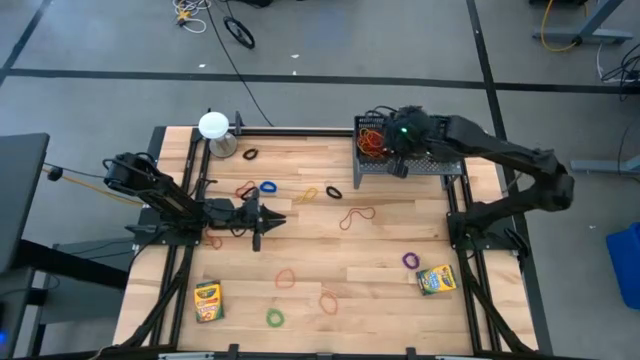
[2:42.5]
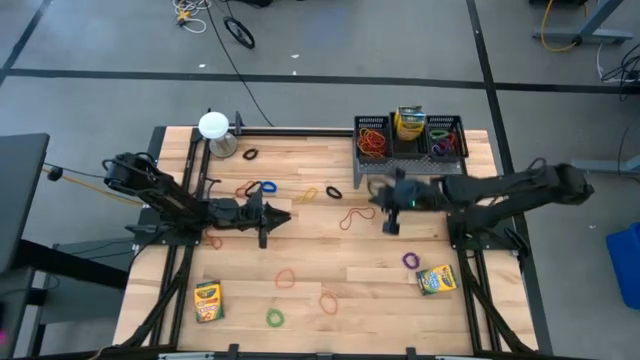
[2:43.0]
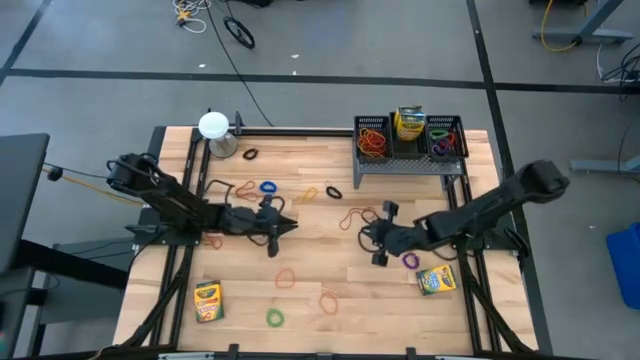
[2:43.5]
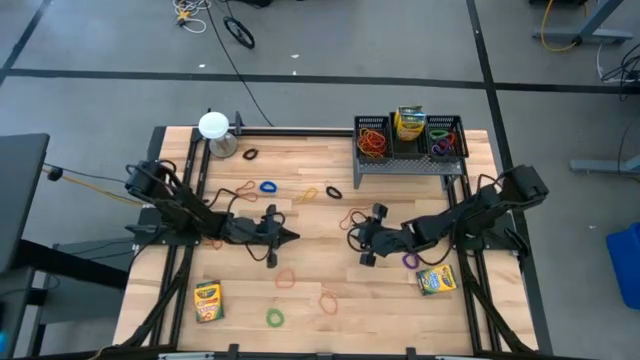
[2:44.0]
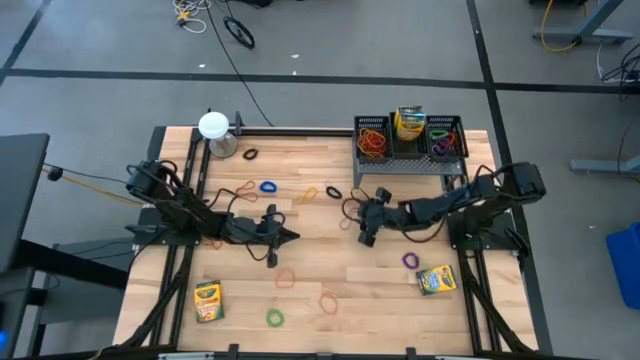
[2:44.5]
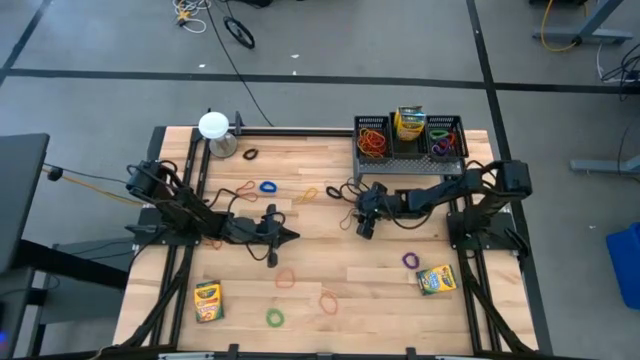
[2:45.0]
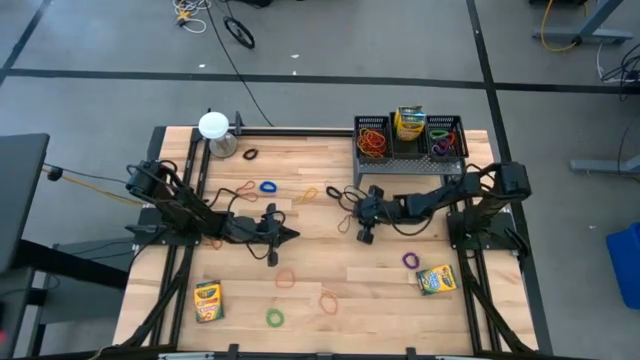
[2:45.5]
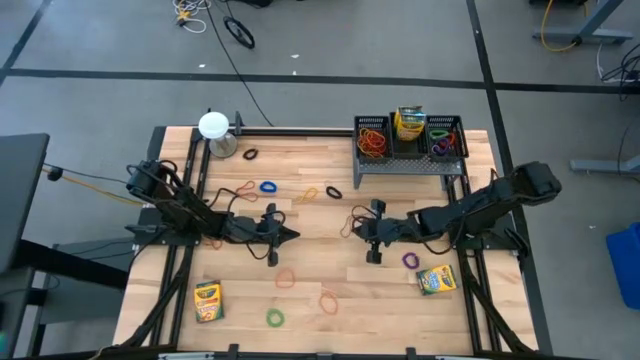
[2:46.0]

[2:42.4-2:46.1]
Task: Pick & Place Office Desk Supplies
Put the red rubber band into the left black bin on the shelf

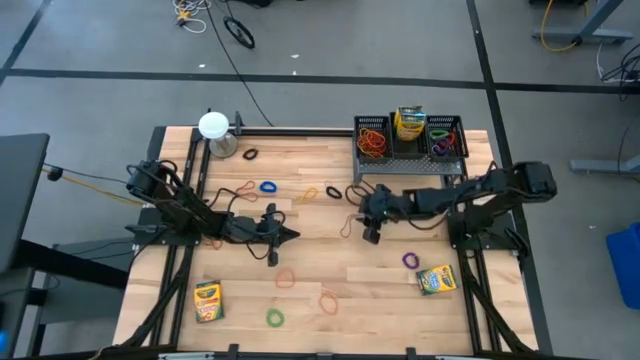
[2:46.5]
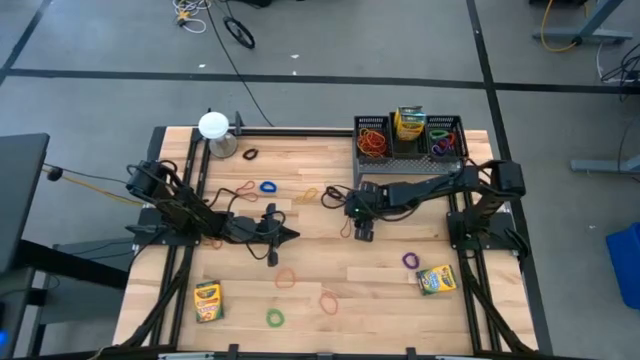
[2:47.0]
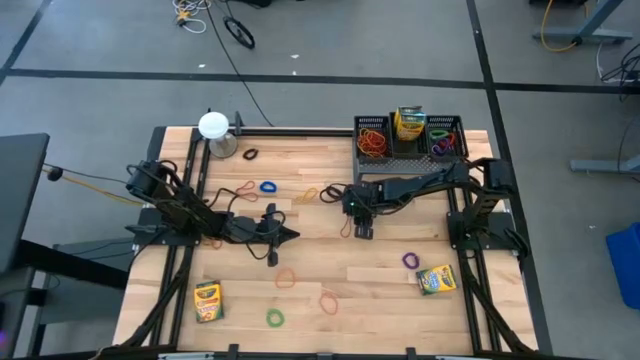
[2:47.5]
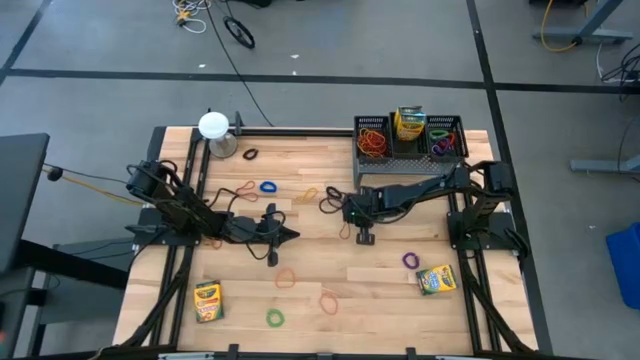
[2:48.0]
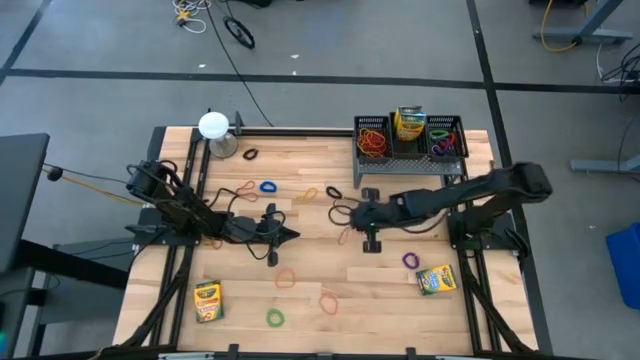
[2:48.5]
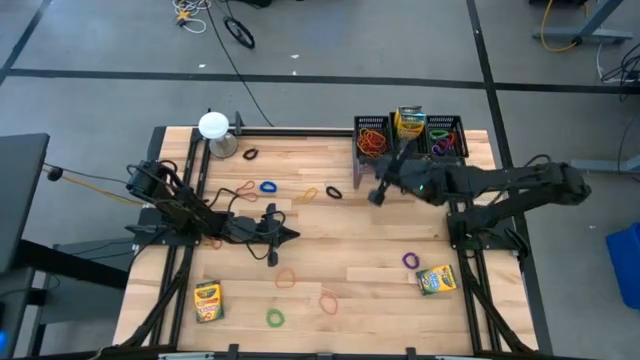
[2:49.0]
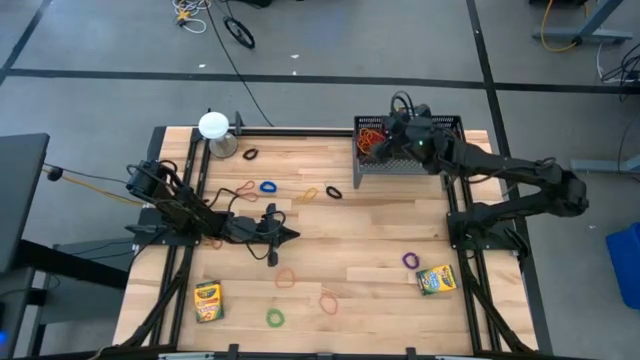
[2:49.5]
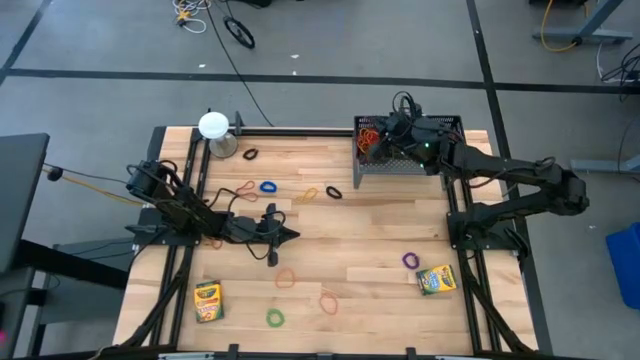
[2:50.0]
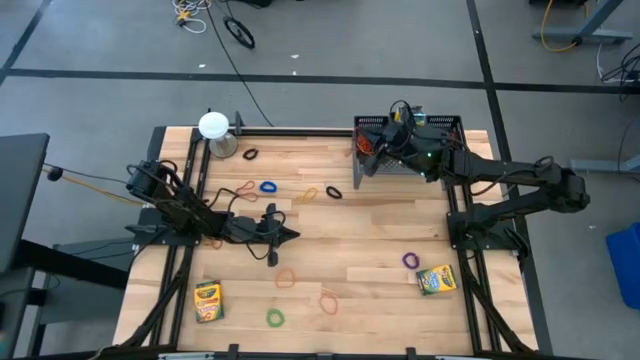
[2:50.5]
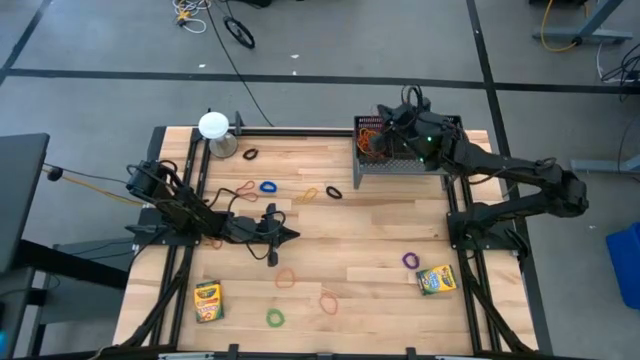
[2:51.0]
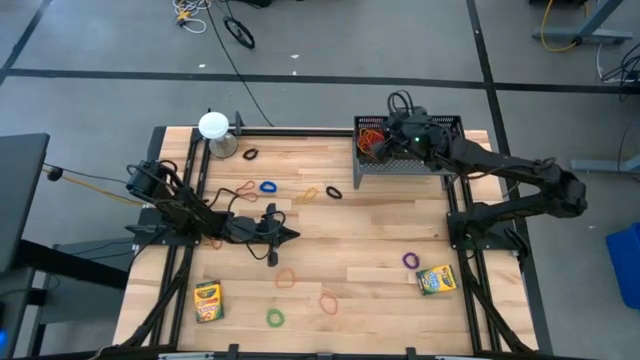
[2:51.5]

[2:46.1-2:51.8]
Put the red rubber band into the left black bin on the shelf

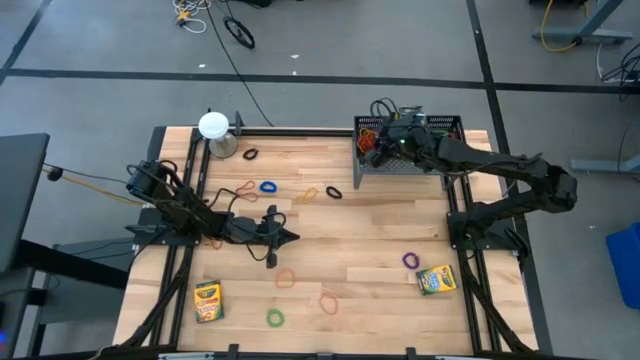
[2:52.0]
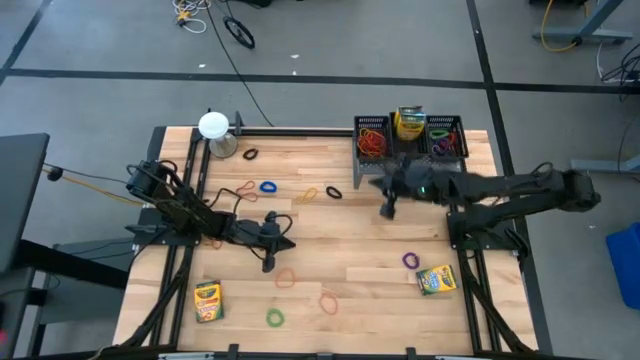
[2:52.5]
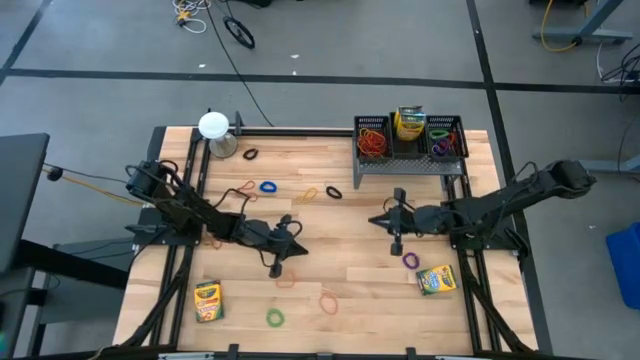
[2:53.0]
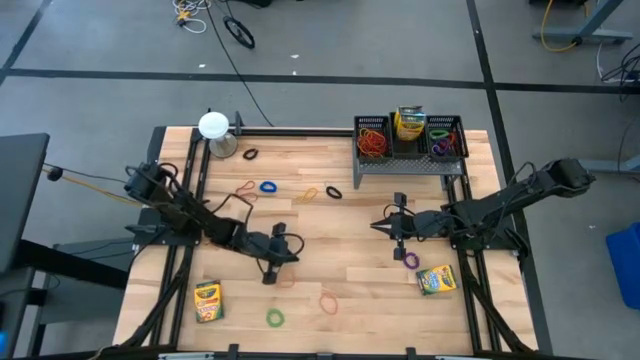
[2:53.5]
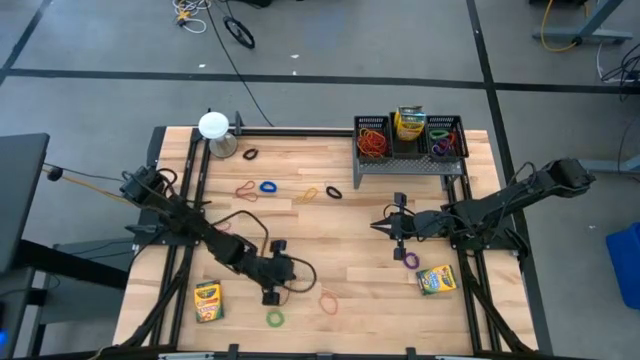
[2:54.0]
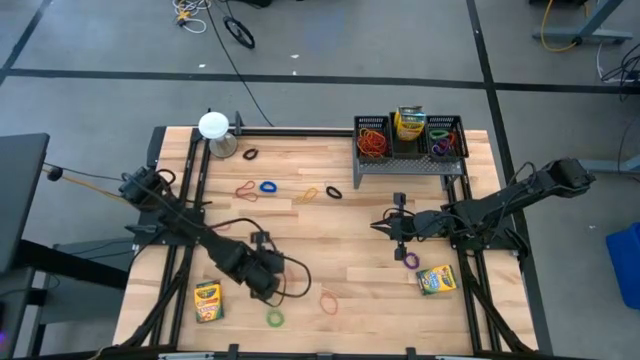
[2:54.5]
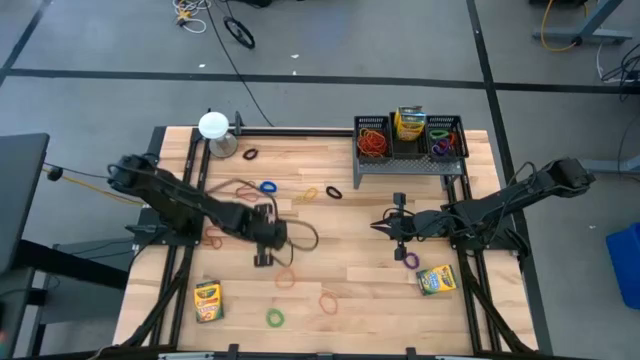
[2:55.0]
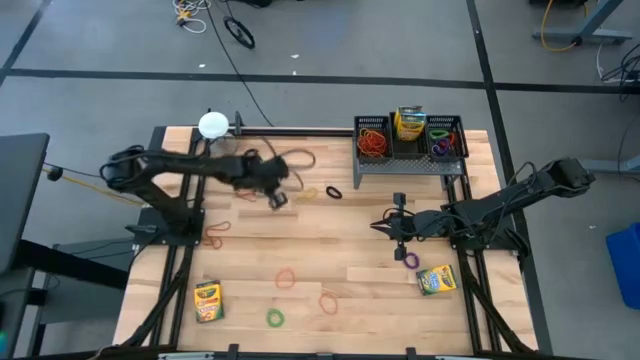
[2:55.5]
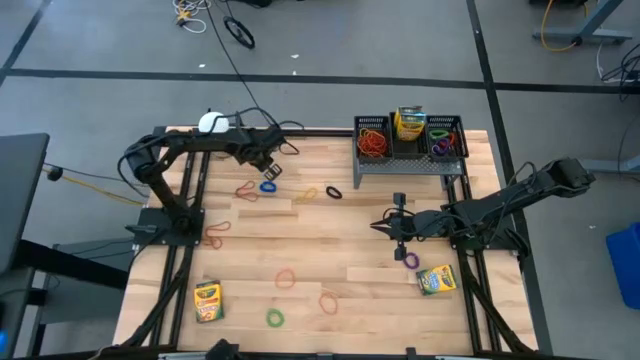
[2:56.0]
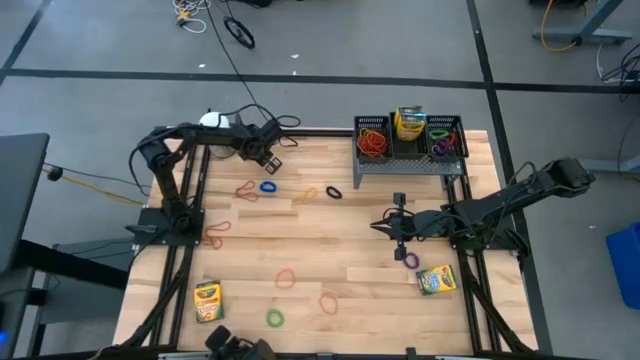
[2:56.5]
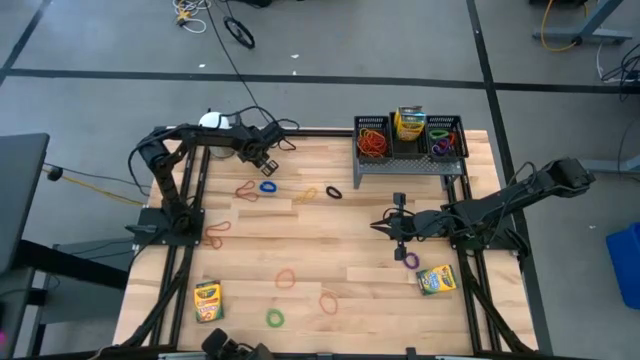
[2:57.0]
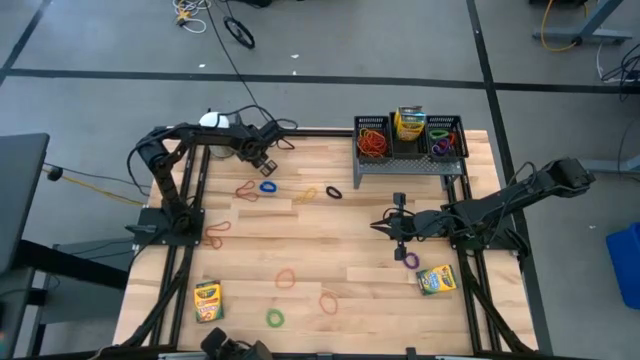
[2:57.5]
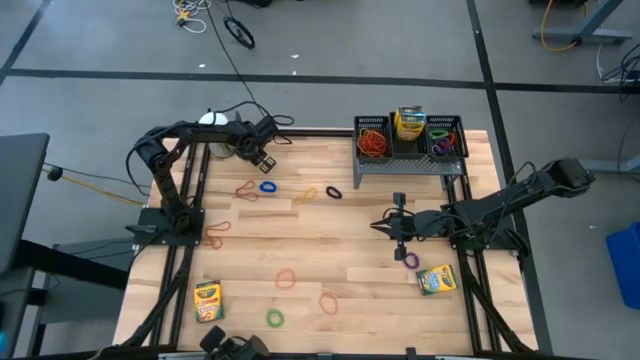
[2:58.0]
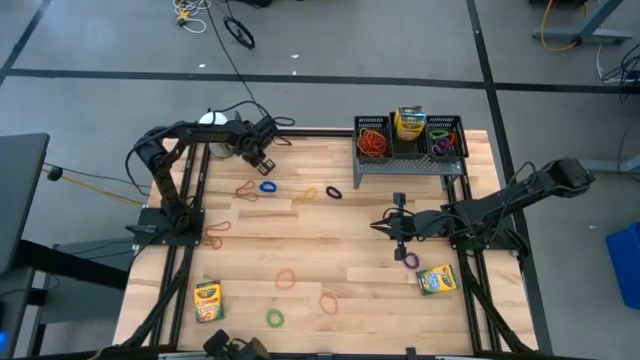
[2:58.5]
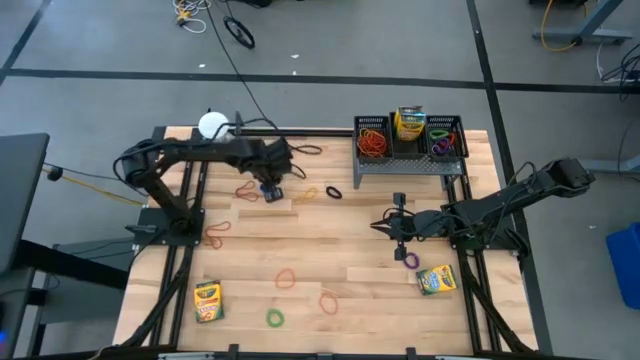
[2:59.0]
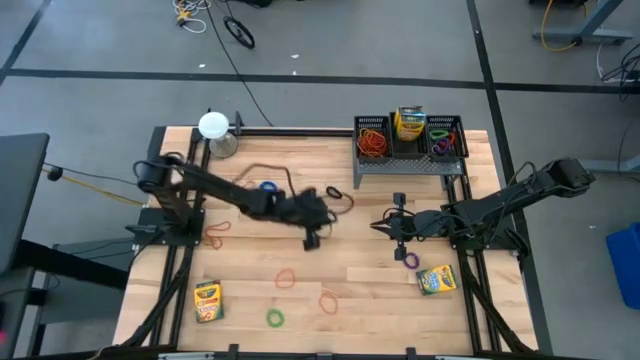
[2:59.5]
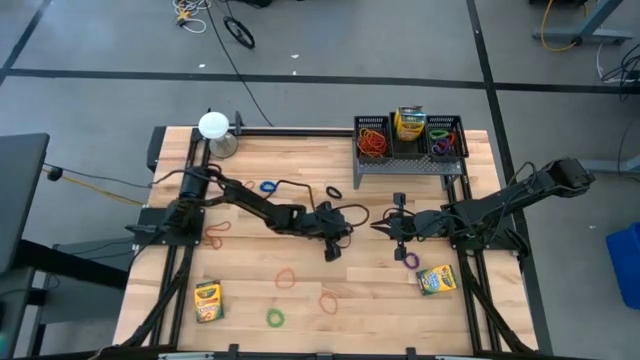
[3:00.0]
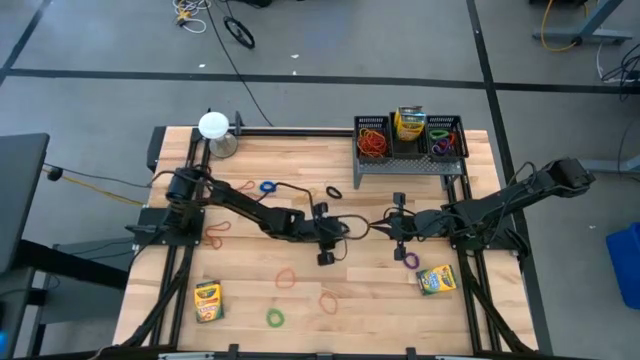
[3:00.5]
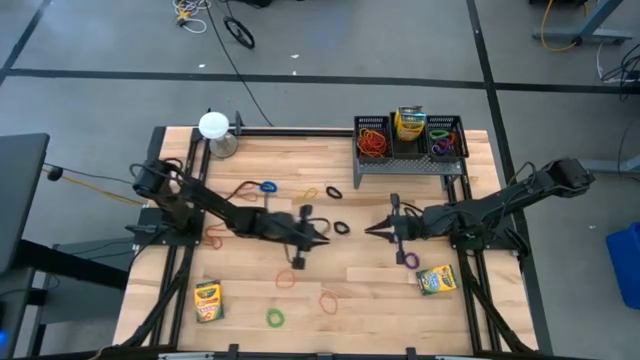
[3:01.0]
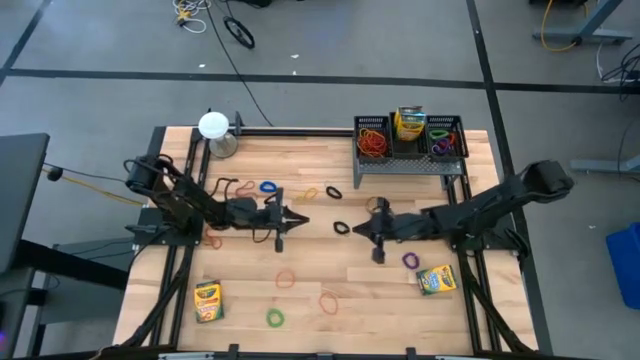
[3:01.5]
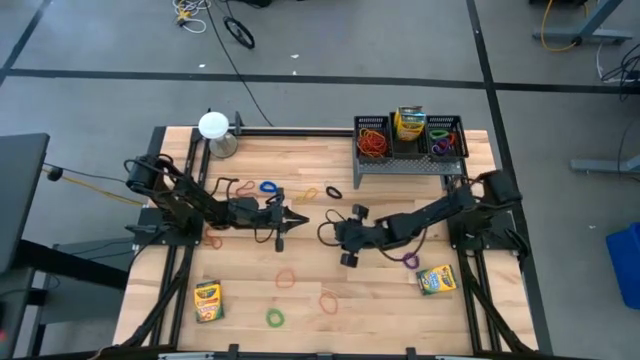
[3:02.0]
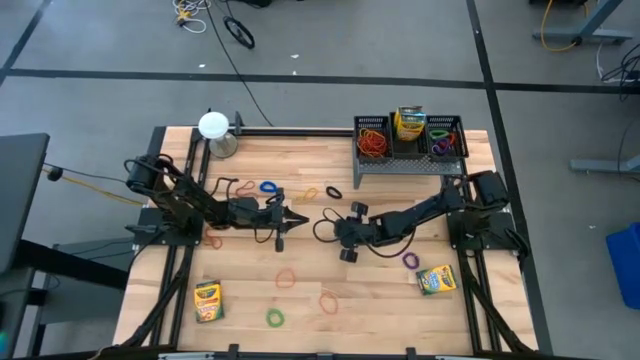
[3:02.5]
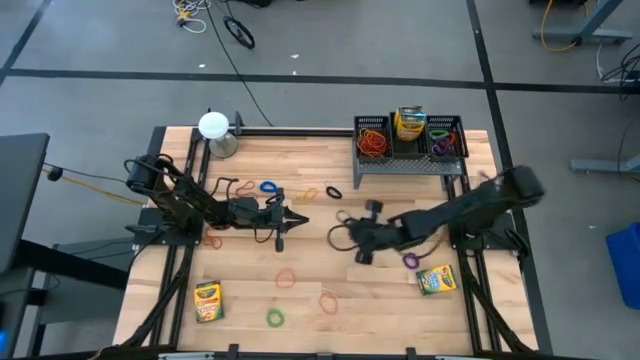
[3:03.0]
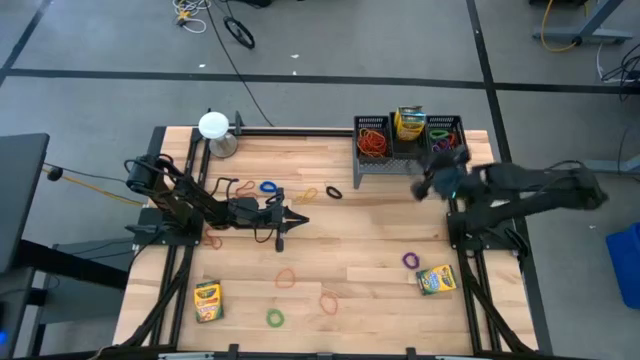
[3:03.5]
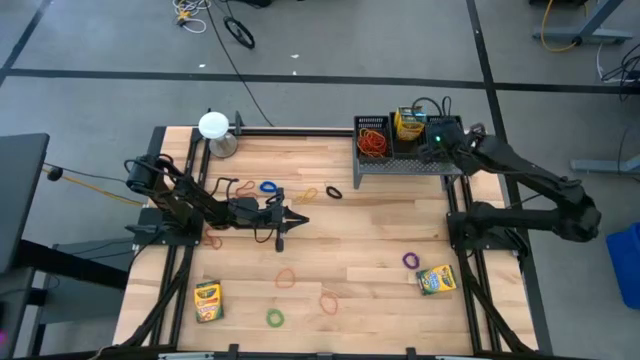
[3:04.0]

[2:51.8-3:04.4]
Put the black spring keychain into the right black bin on the shelf
